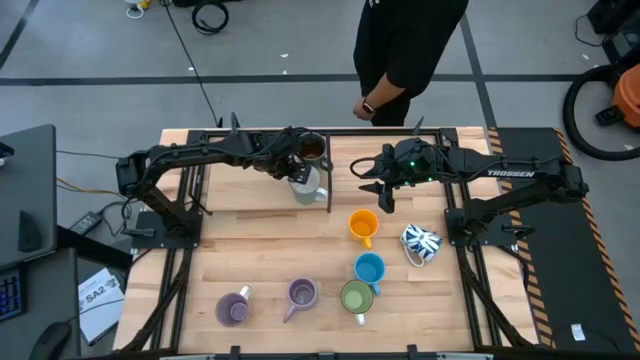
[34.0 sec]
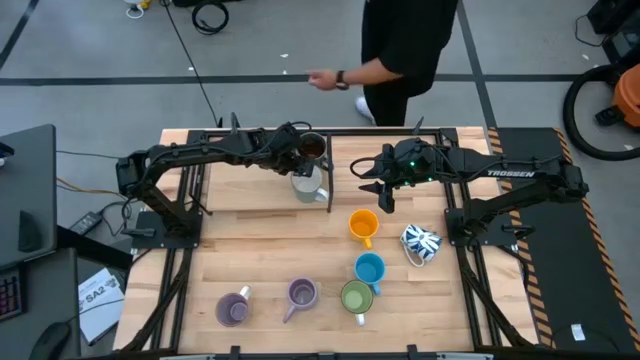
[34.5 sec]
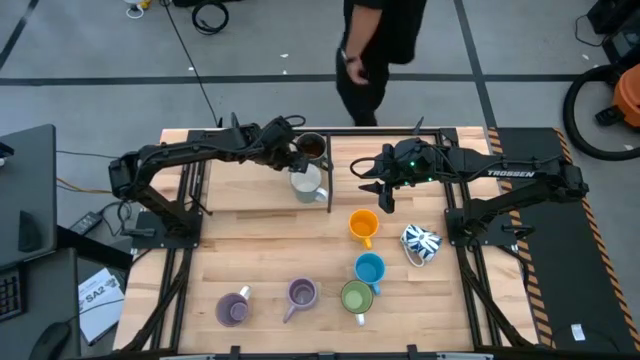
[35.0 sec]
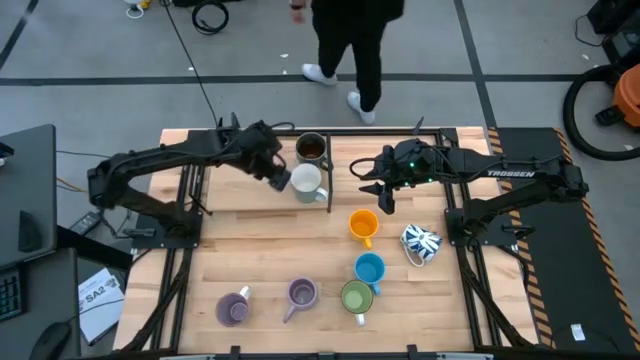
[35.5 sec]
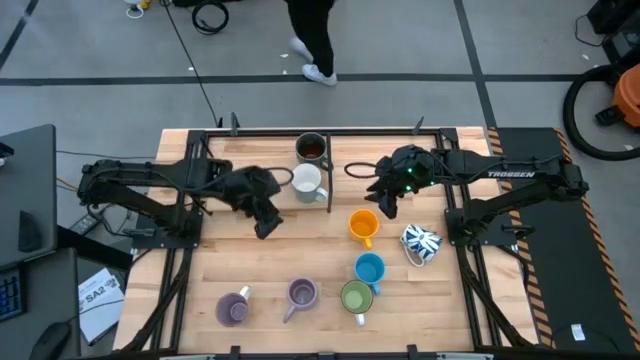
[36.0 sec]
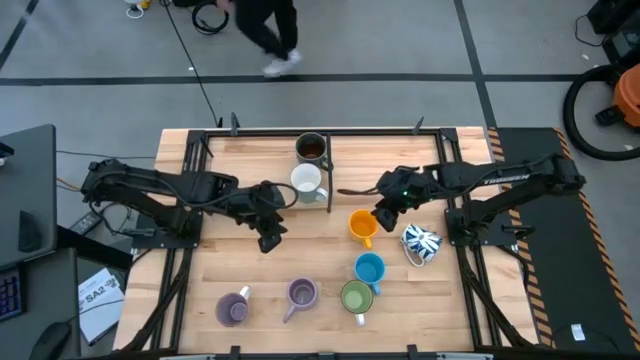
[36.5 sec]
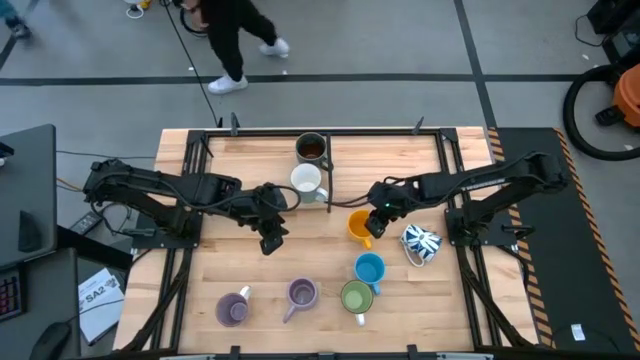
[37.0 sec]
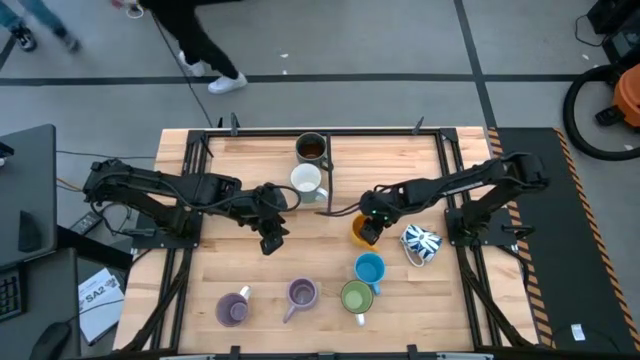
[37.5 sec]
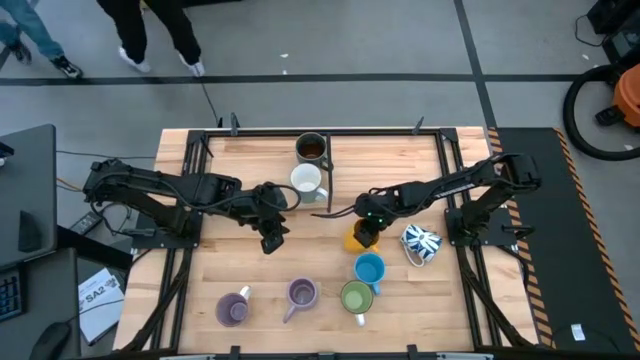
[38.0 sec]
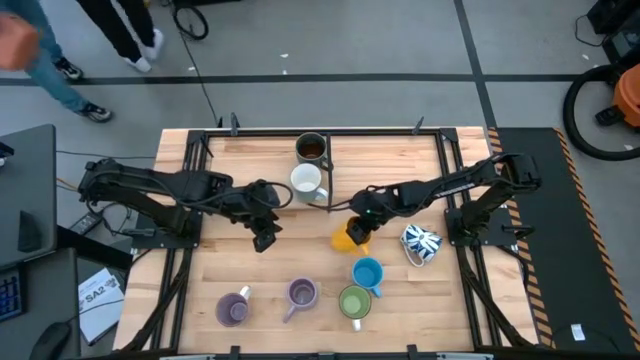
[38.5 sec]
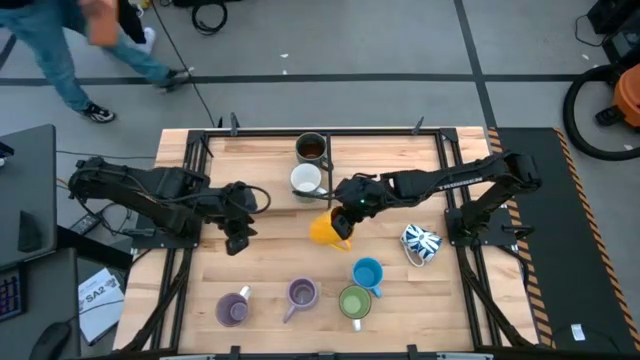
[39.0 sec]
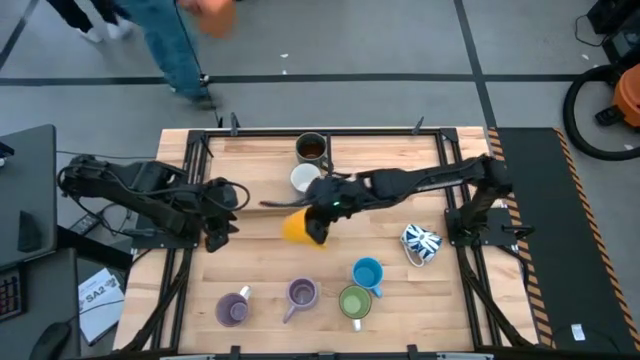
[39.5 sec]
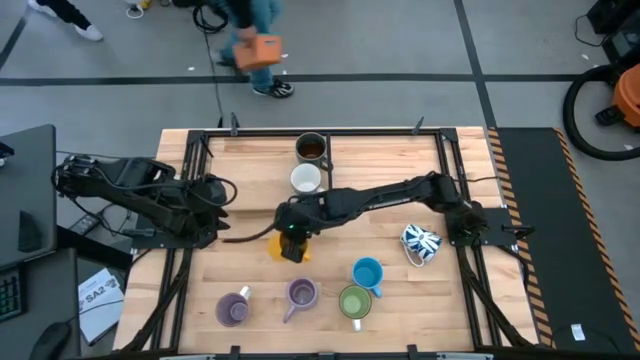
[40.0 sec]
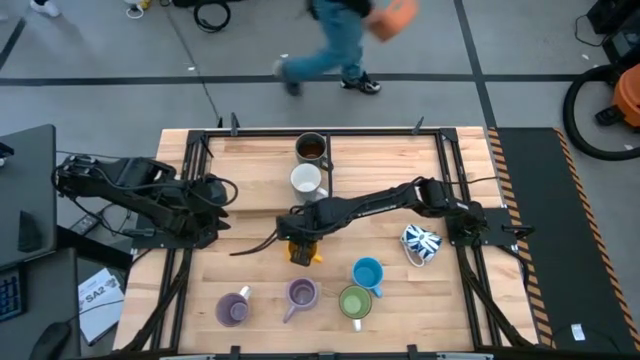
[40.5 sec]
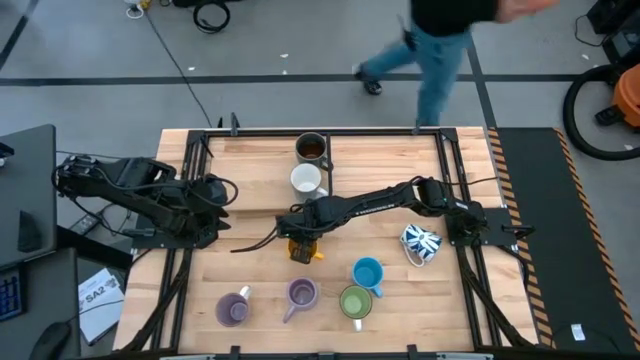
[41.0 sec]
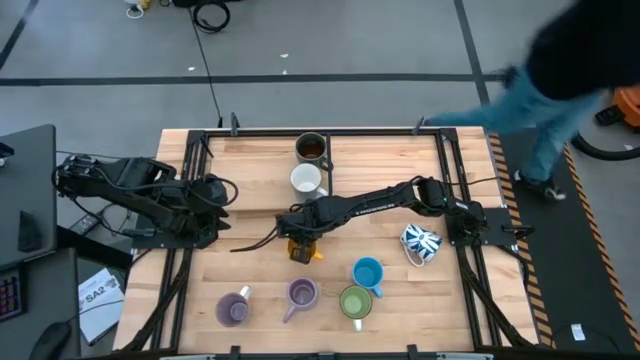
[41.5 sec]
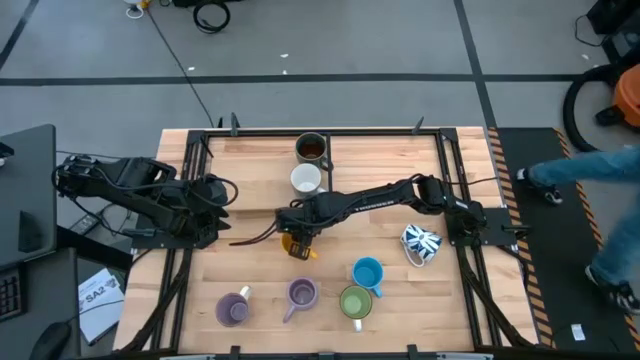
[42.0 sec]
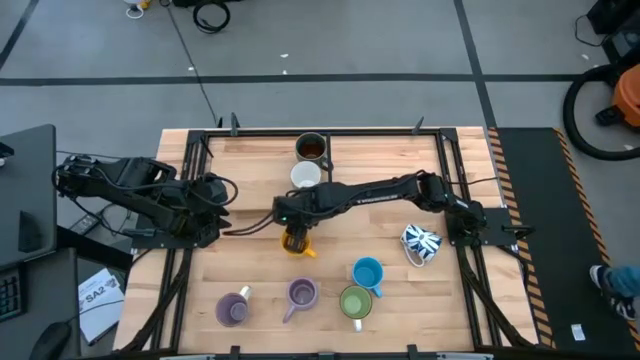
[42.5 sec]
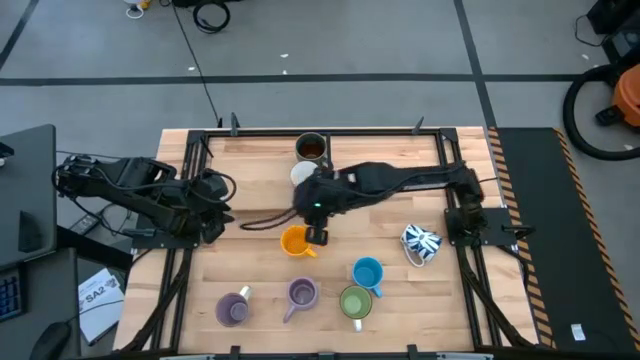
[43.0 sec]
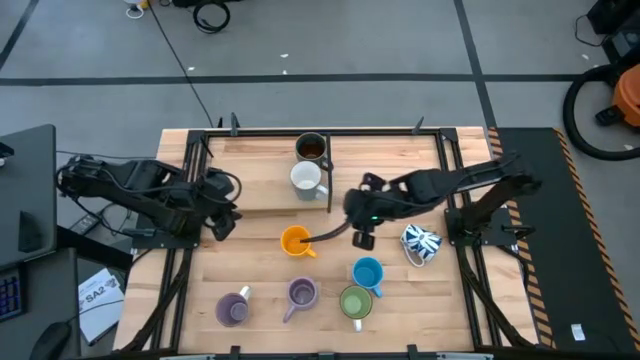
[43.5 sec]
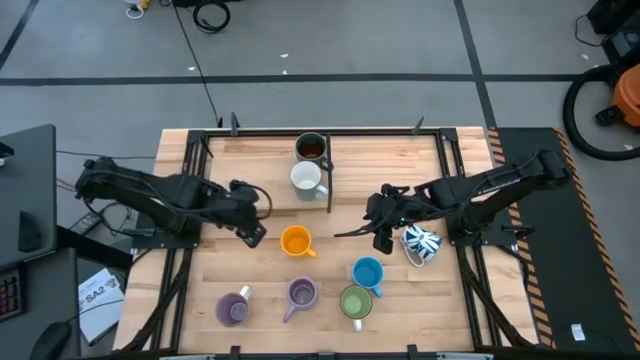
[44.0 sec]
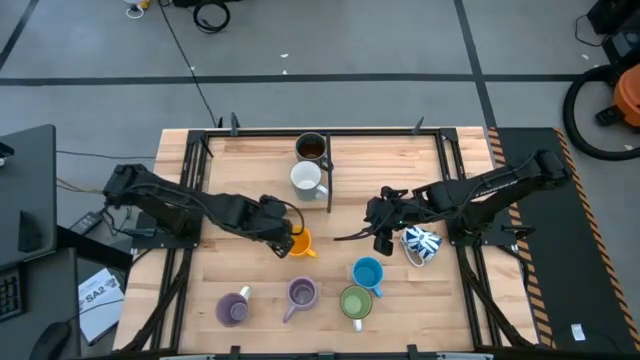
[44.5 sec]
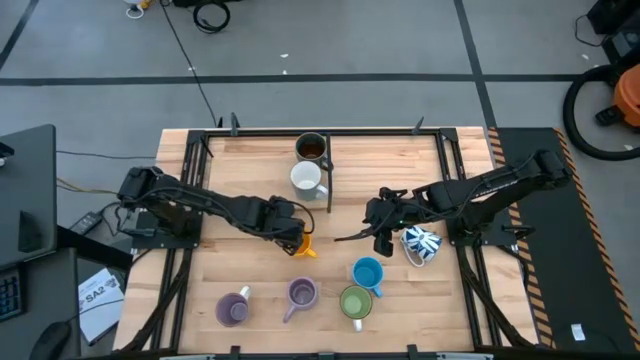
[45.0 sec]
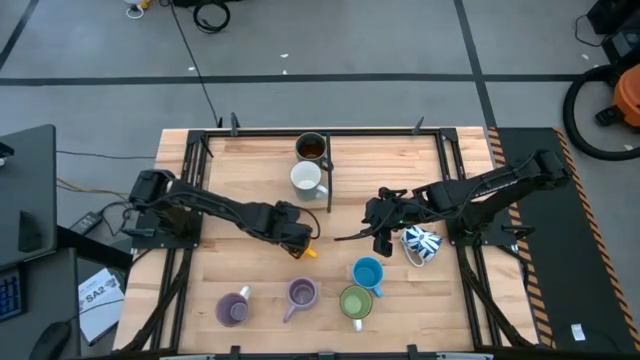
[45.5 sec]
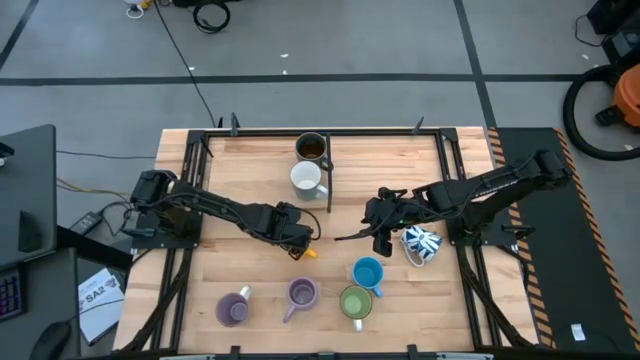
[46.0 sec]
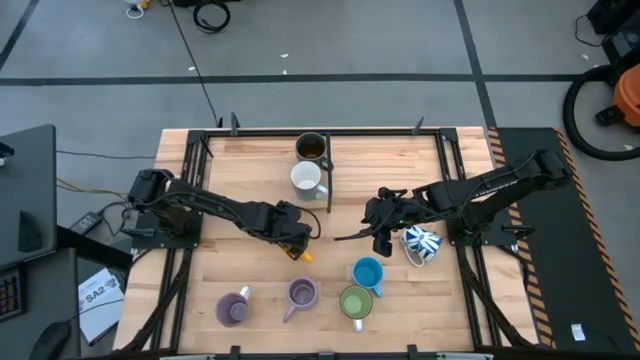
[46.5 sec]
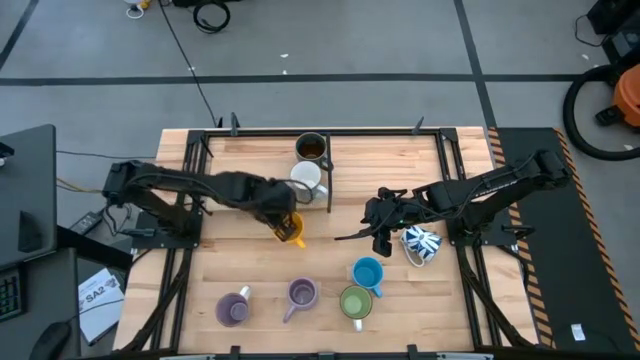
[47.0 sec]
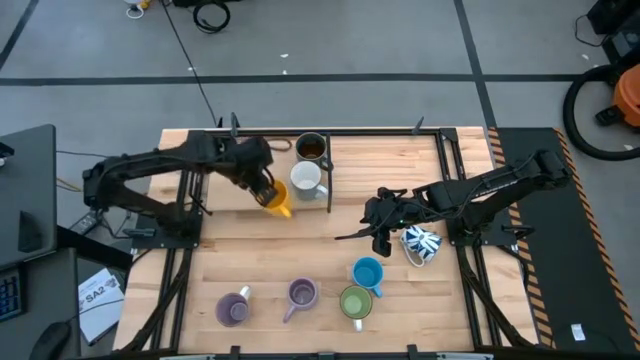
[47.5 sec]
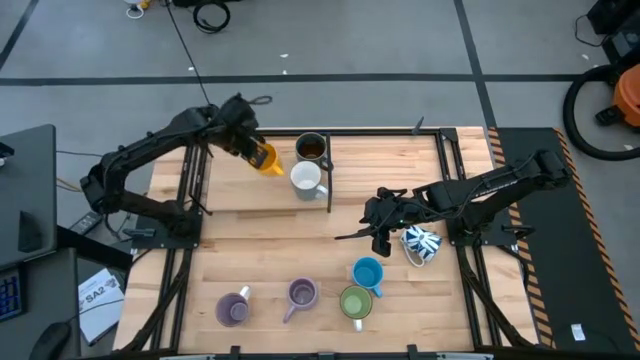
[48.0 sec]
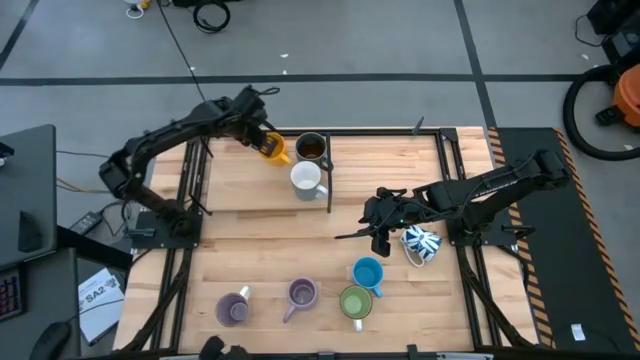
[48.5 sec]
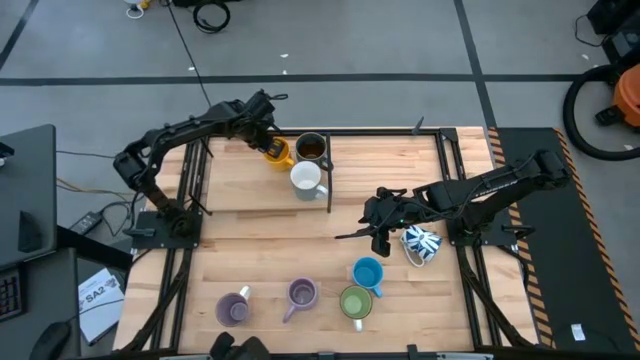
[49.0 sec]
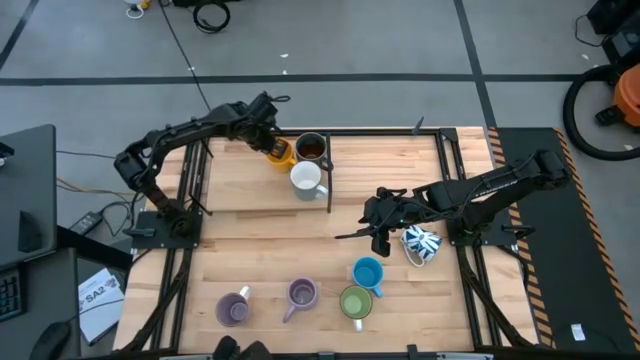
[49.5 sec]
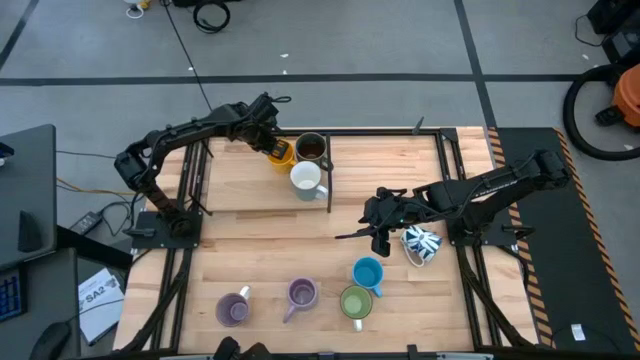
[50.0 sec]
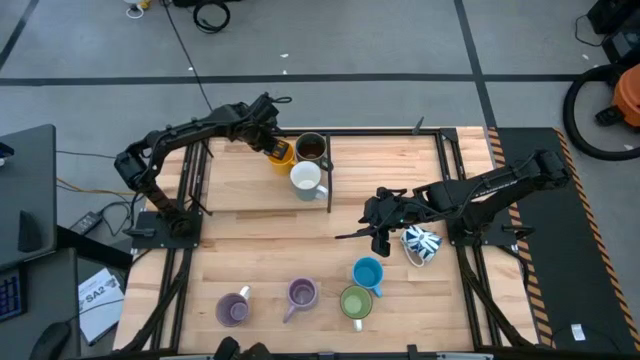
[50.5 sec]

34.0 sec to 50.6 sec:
Task: Place coffee mugs
Put the yellow mug on the shelf

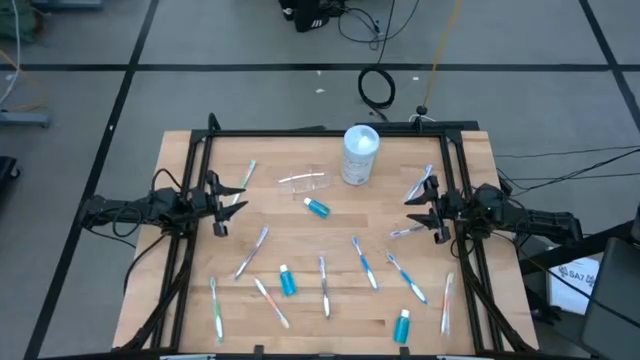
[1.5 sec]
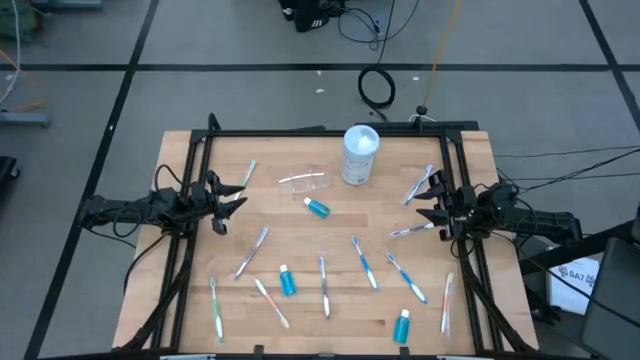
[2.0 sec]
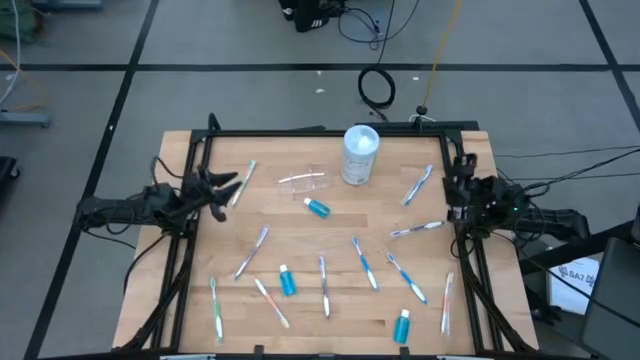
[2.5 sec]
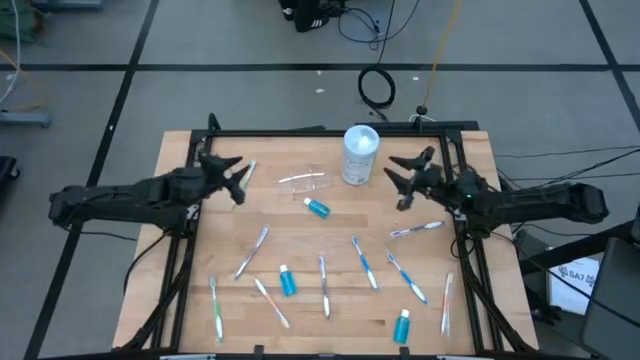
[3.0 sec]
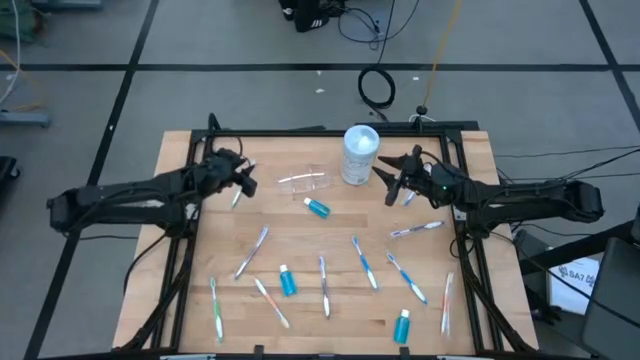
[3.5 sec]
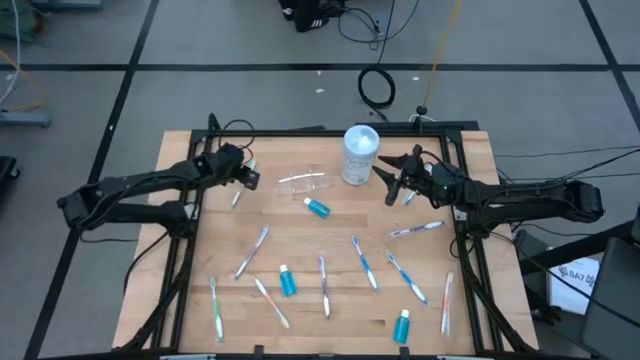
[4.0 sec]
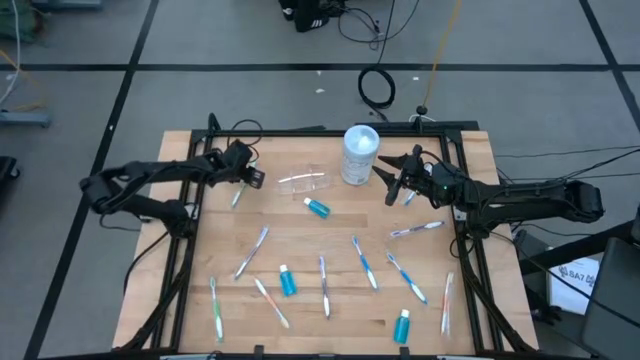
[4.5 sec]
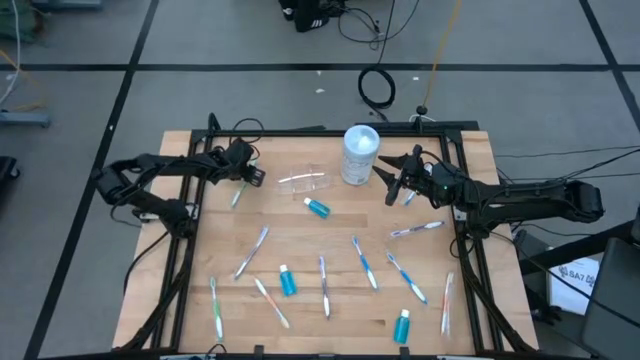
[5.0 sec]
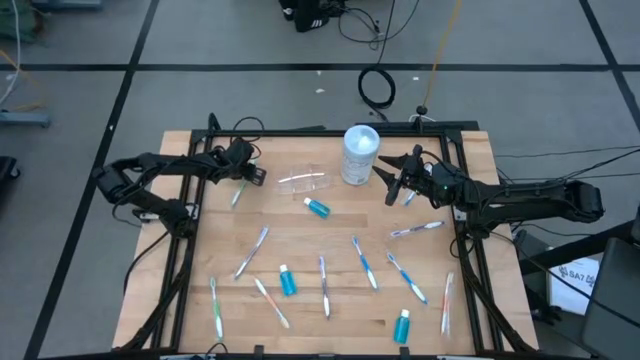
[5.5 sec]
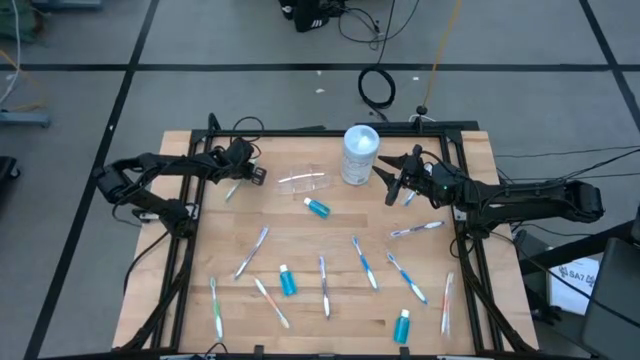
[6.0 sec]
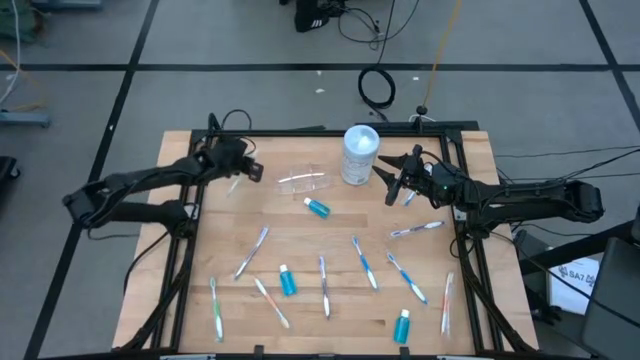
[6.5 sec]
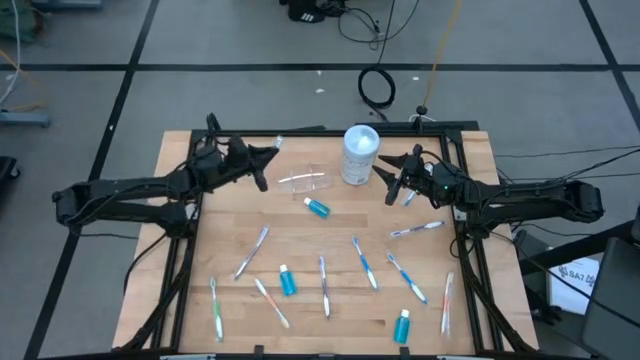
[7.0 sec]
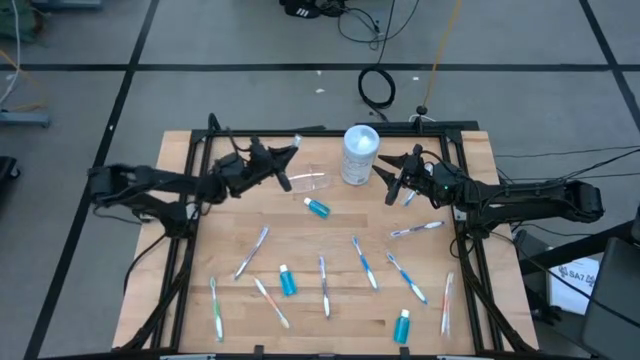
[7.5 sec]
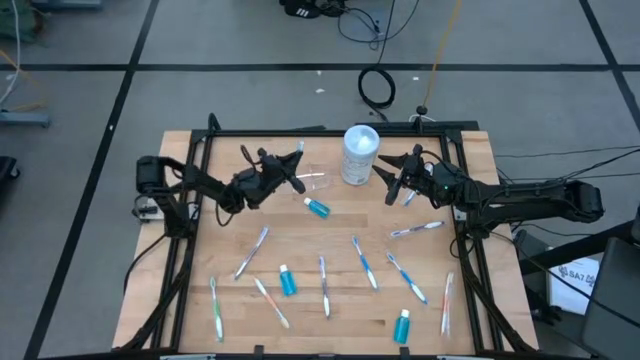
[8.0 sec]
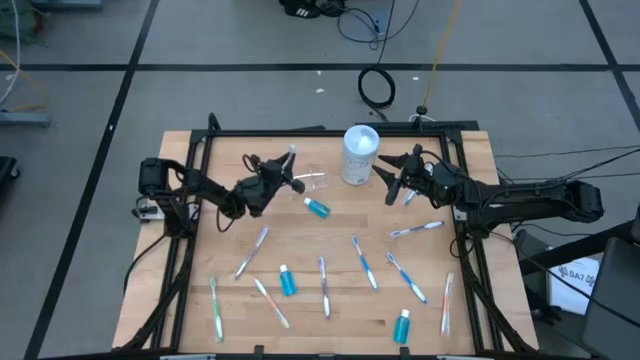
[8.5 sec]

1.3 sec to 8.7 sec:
Task: Pick & Place toothbrushing station
Put the top green toothbrush in the left compartment of the transparent organizer
